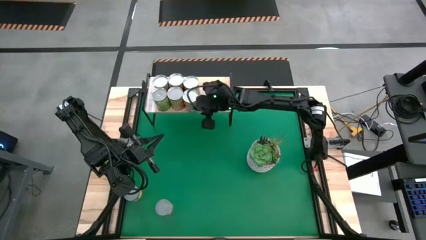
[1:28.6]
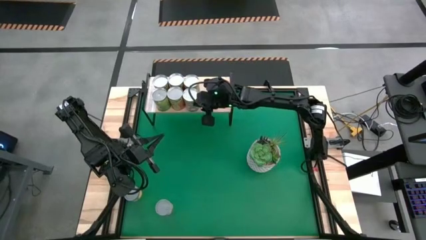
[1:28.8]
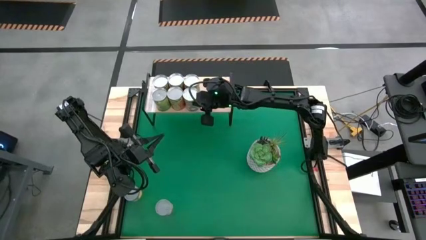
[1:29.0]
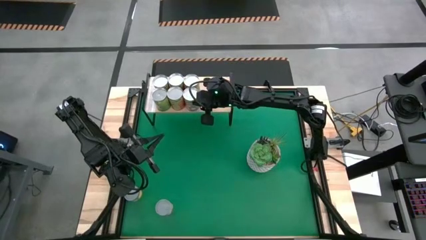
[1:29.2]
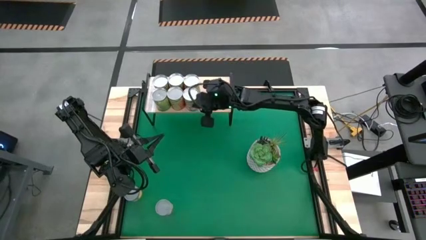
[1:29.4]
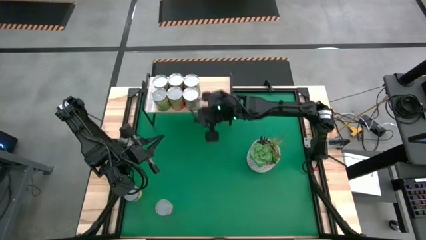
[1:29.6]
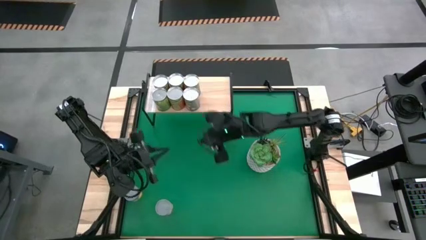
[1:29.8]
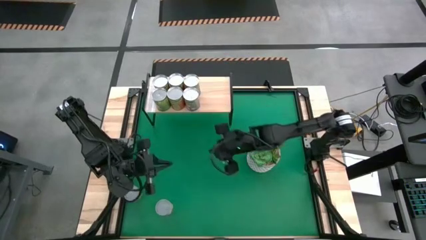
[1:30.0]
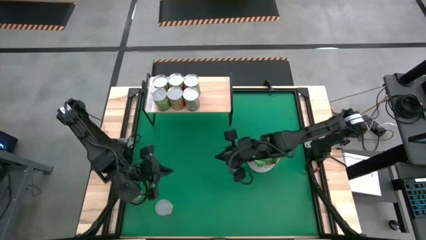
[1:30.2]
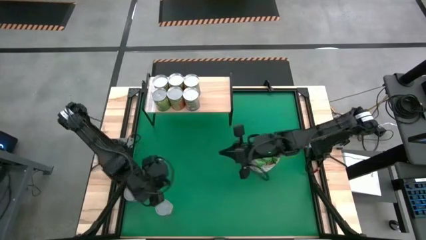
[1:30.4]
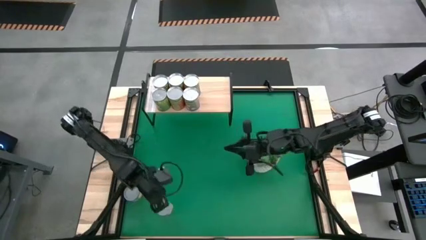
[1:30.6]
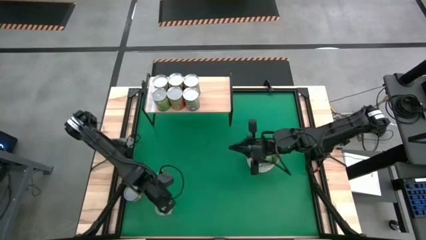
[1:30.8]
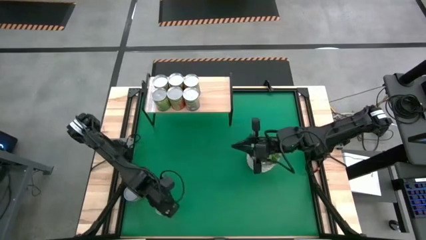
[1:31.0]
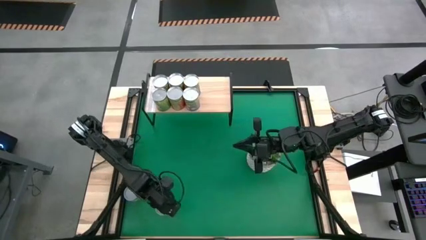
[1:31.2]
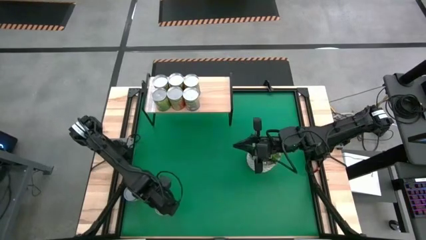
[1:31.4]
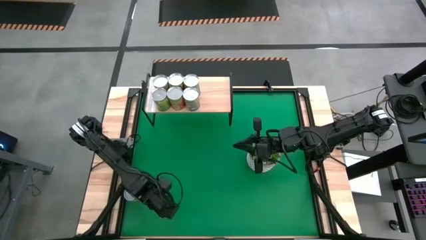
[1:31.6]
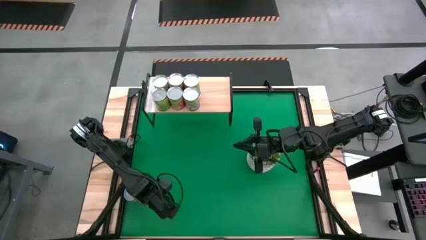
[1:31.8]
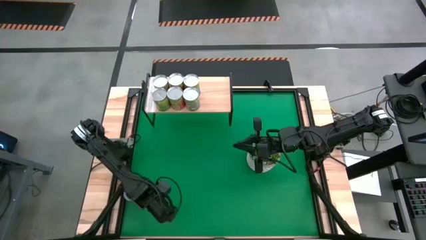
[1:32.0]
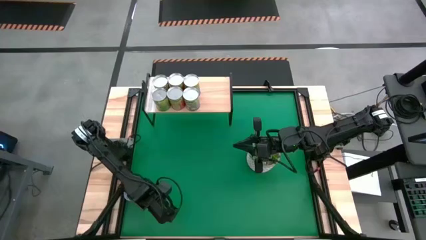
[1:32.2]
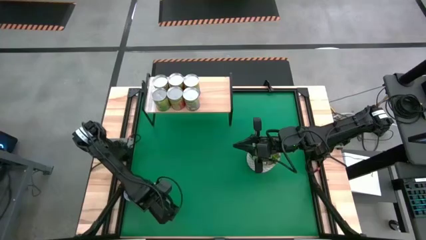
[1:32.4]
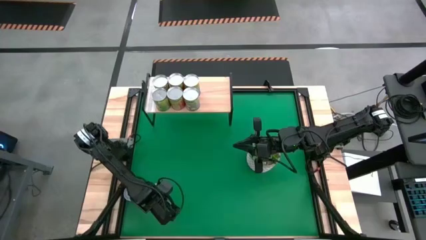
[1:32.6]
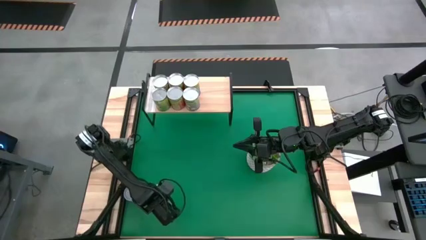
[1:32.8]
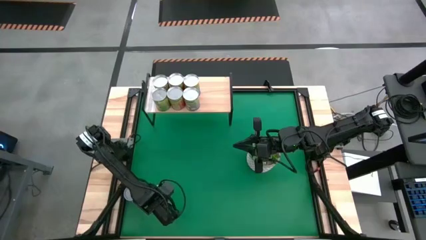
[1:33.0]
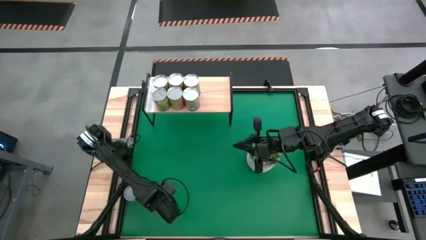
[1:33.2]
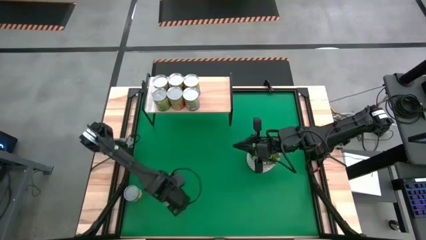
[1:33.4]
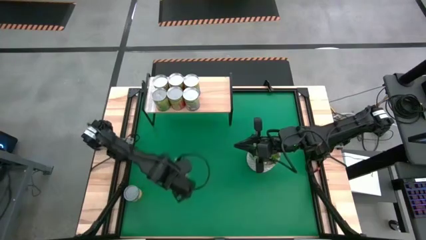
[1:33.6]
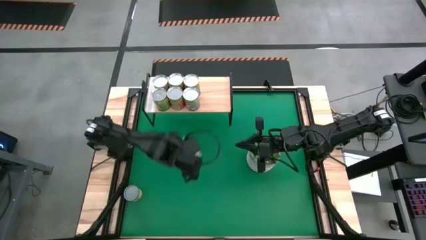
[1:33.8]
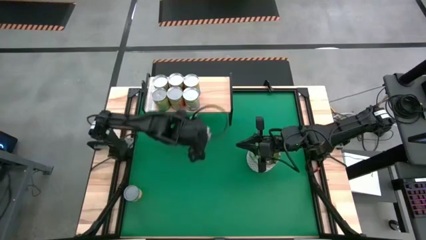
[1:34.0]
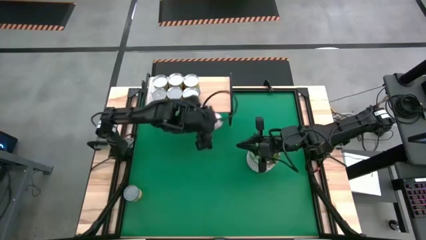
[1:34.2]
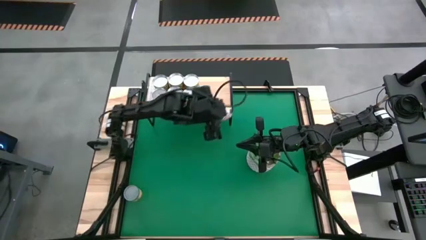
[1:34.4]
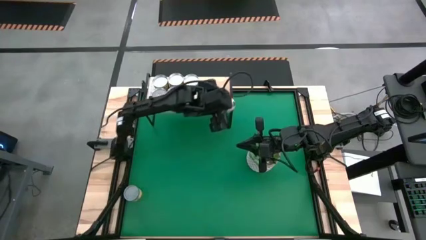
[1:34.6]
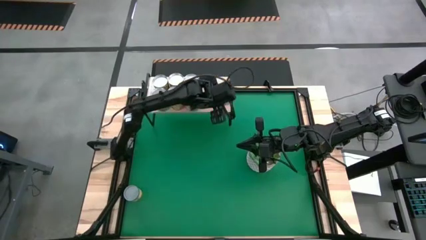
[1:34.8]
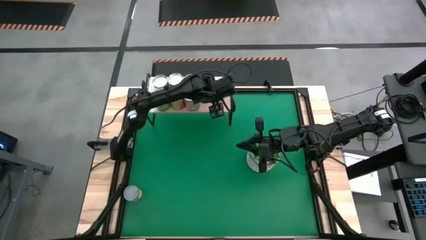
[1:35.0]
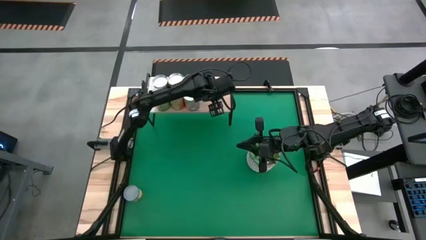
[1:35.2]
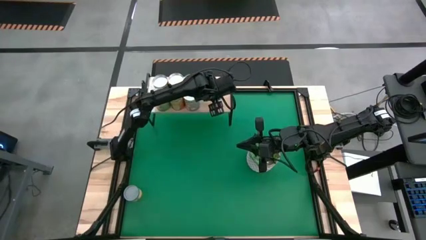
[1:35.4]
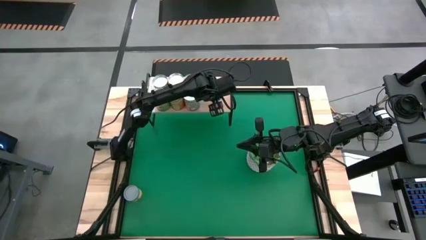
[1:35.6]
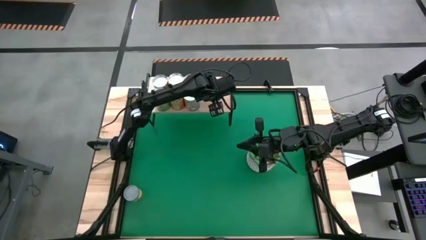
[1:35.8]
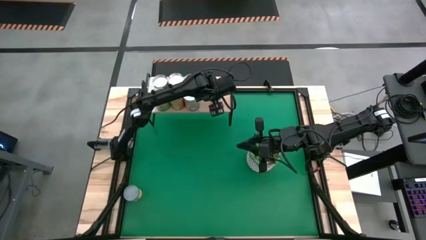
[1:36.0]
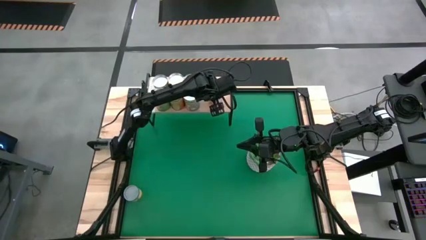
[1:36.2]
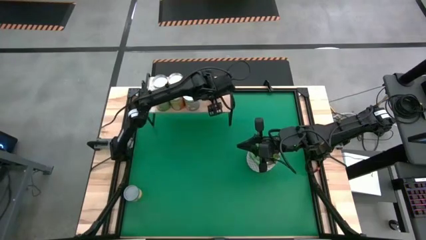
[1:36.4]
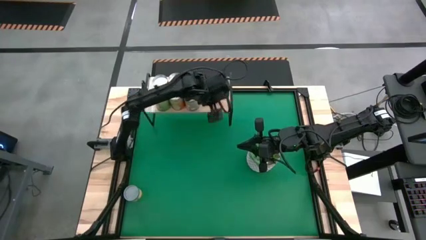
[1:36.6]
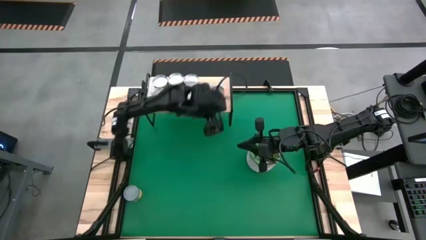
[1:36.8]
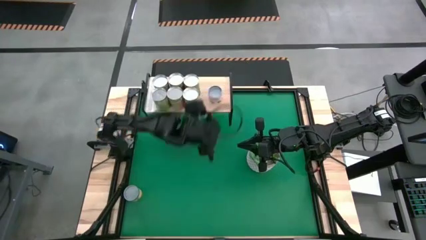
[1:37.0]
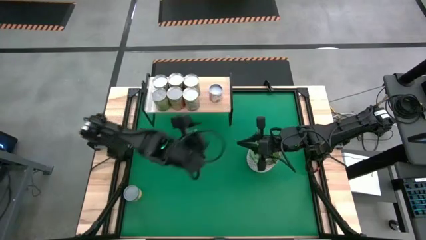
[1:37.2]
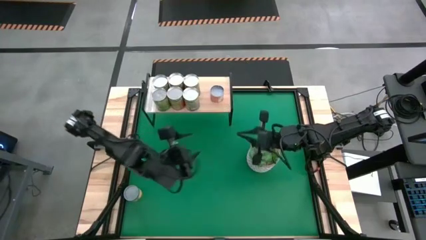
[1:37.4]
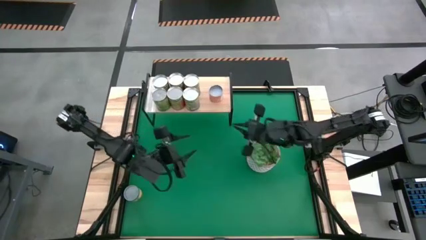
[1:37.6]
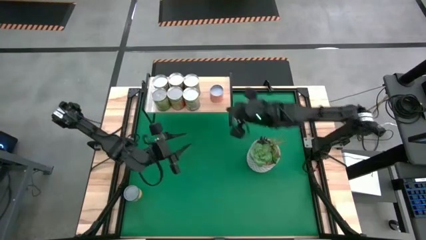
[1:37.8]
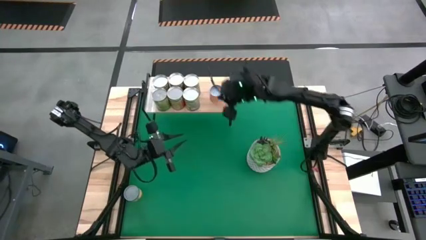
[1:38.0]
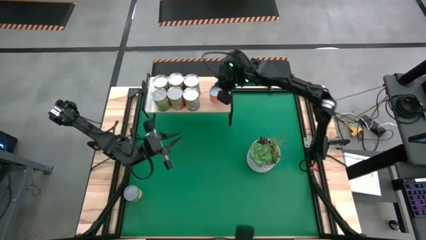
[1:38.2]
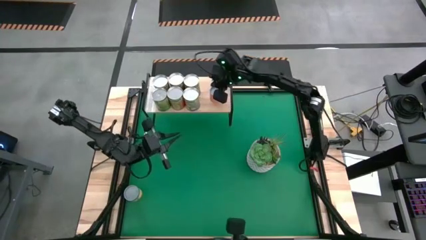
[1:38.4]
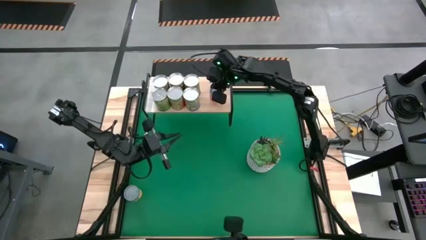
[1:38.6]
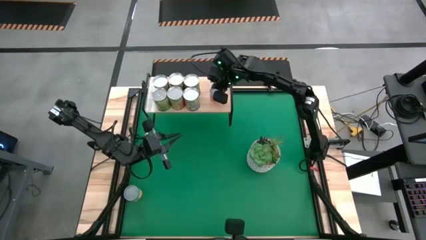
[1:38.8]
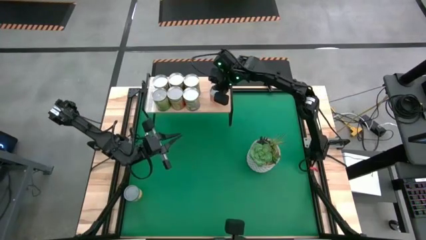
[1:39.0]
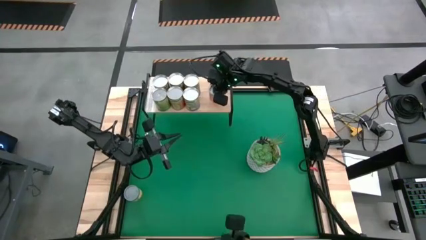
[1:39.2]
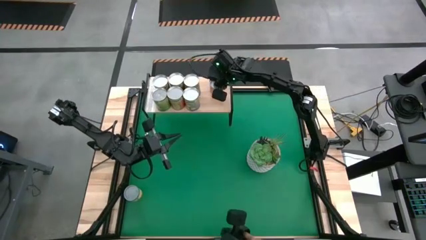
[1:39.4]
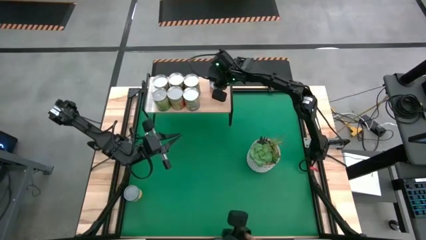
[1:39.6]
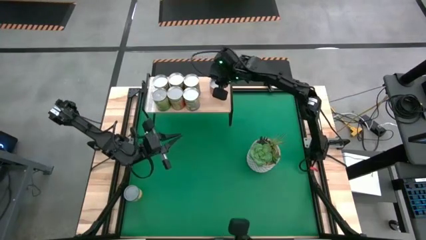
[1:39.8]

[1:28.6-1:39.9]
Task: Pick and place cans onto a shelf
Put the small canned orange on the shelf

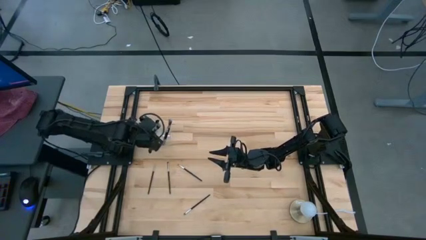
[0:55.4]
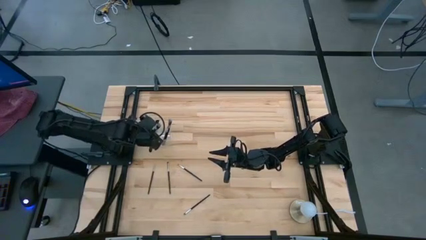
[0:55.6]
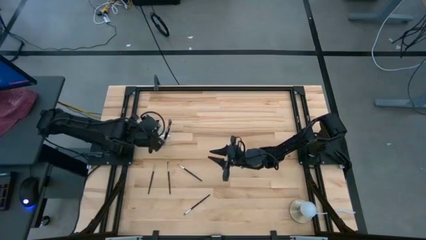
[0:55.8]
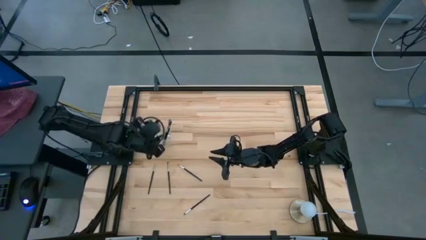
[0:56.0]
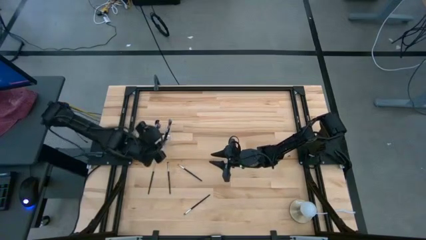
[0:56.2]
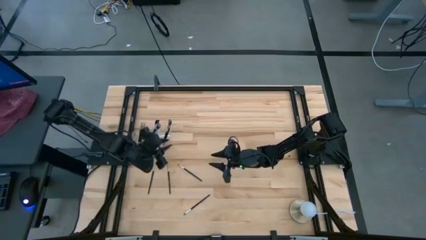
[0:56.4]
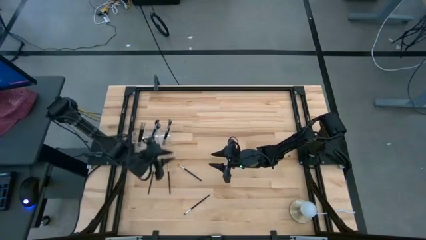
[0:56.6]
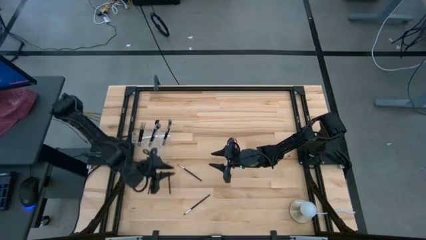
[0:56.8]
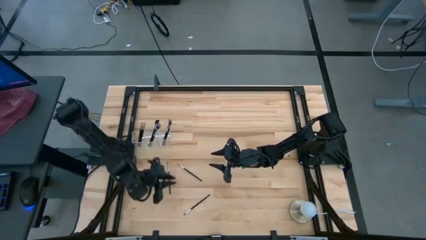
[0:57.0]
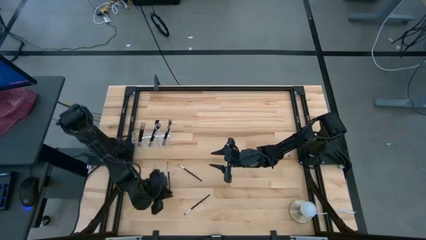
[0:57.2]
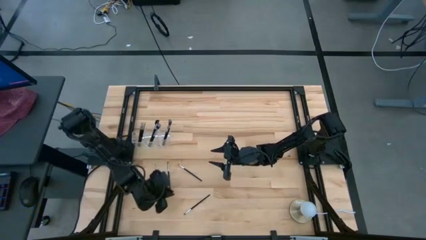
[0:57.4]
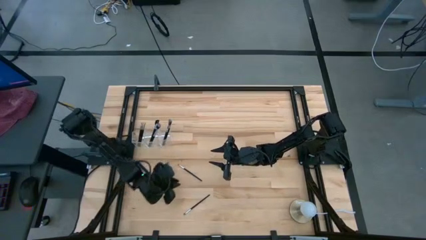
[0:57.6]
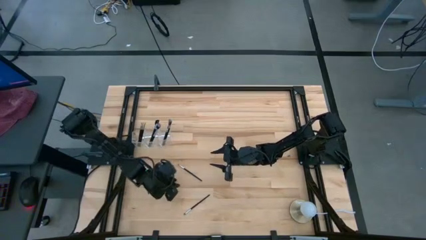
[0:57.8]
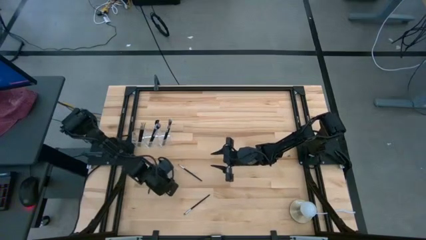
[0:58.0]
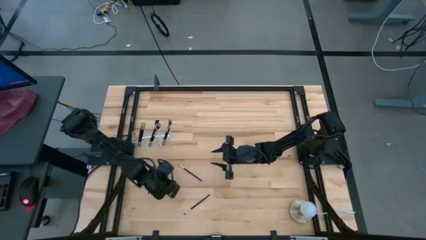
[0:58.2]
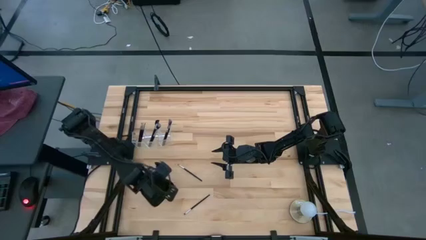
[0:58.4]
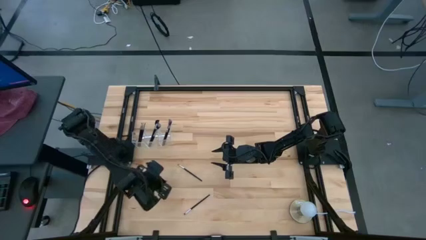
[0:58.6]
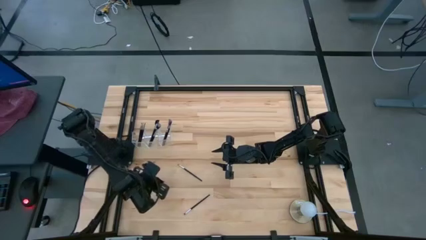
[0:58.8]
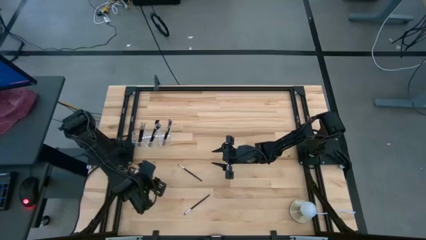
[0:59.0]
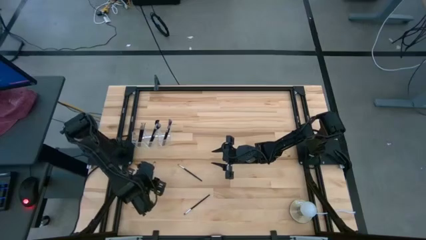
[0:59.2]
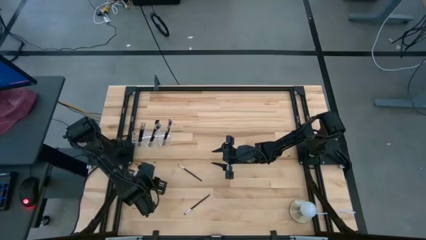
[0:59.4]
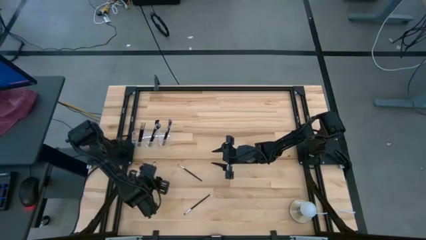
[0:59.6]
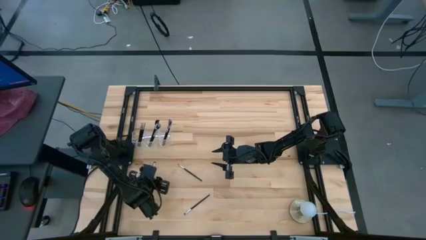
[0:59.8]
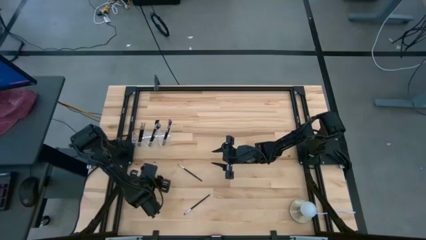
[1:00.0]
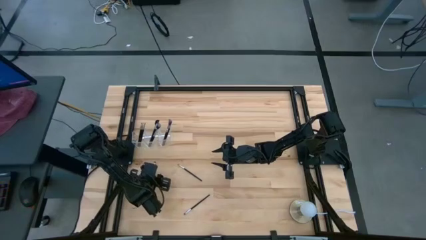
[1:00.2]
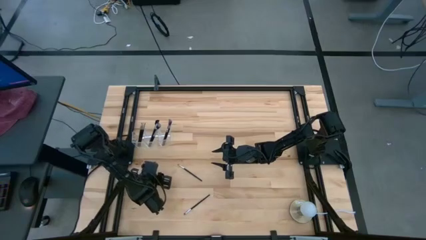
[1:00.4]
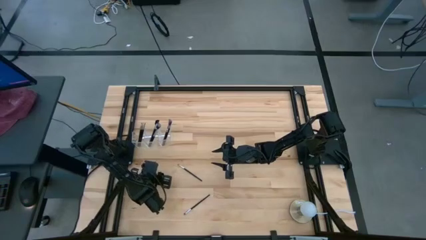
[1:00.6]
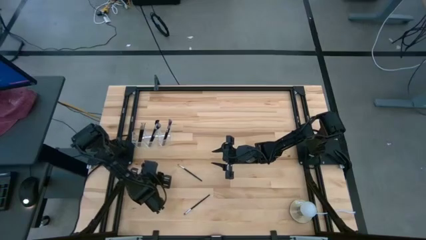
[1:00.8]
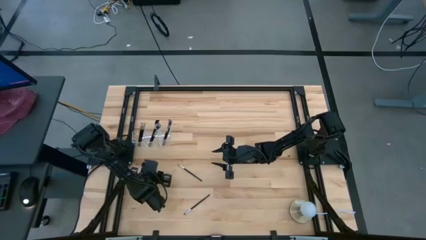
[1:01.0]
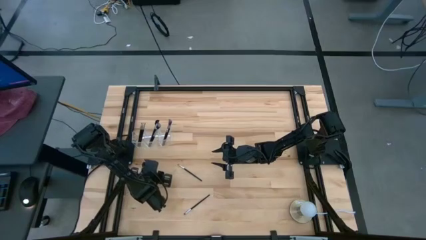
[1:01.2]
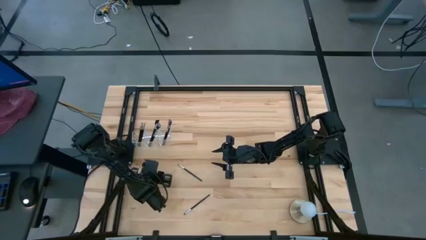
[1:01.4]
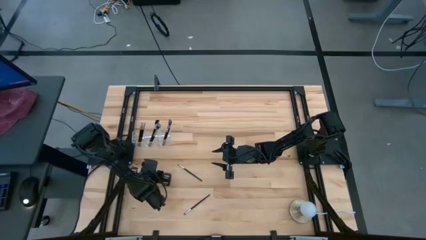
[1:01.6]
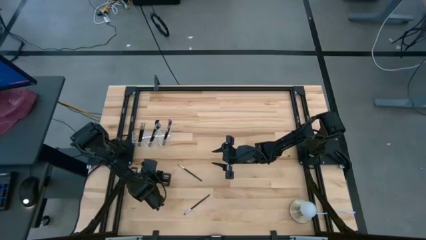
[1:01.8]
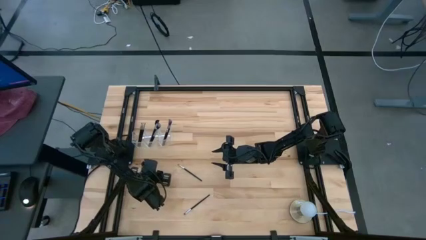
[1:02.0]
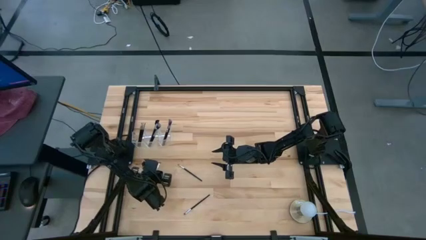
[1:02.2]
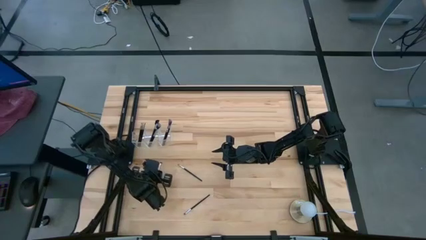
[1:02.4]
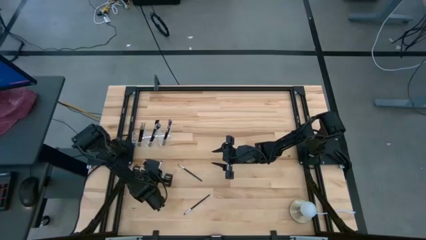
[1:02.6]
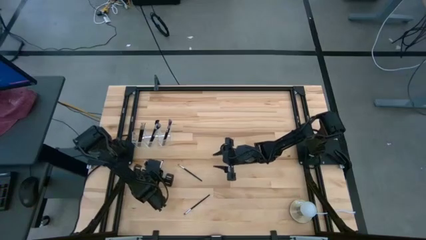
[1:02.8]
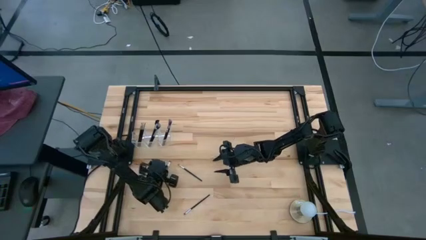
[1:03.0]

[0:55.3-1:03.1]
Task: Put items in baskets/containers
Put the black eyeshadow brush into the transparent organizer
